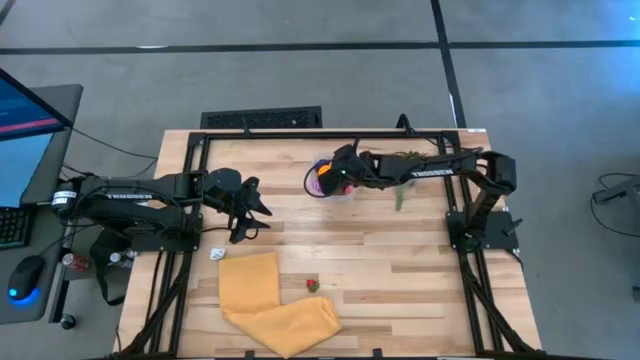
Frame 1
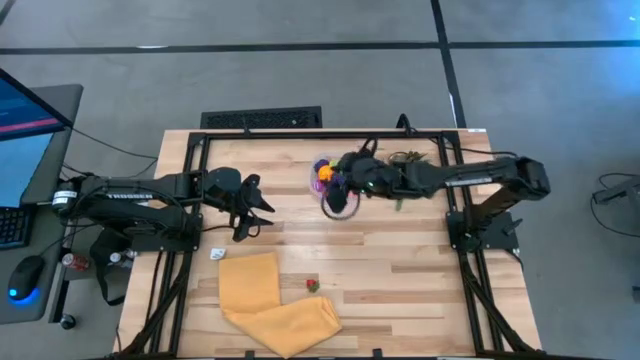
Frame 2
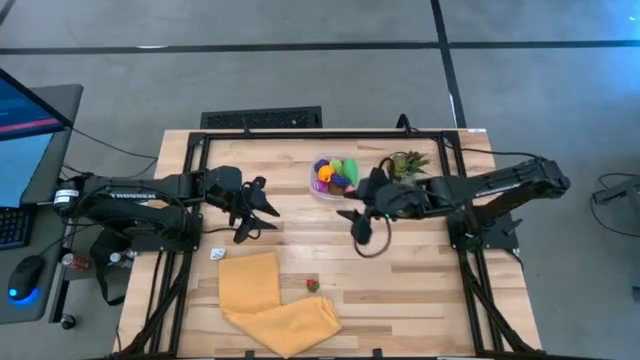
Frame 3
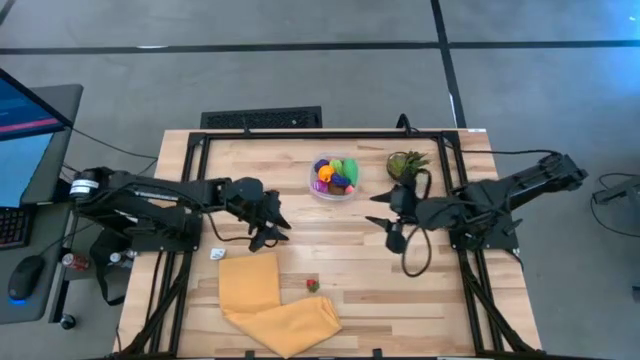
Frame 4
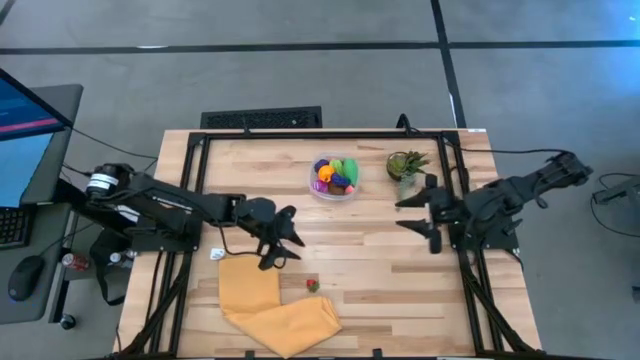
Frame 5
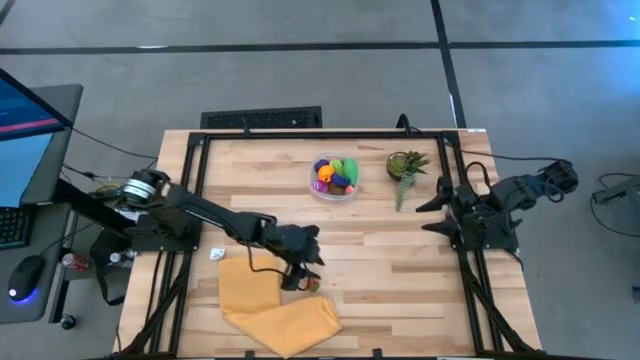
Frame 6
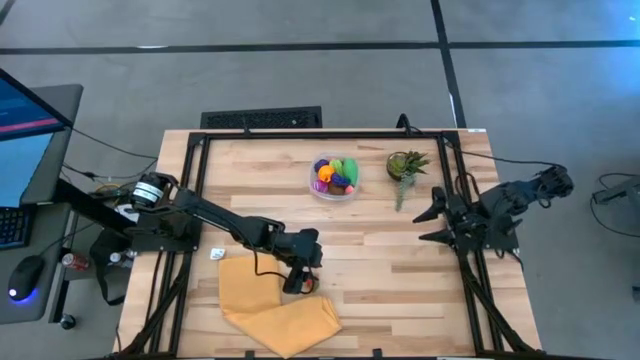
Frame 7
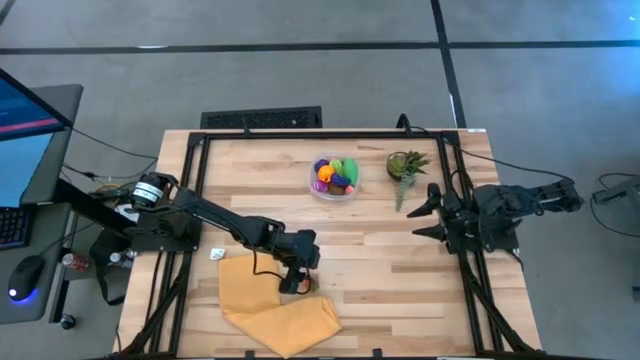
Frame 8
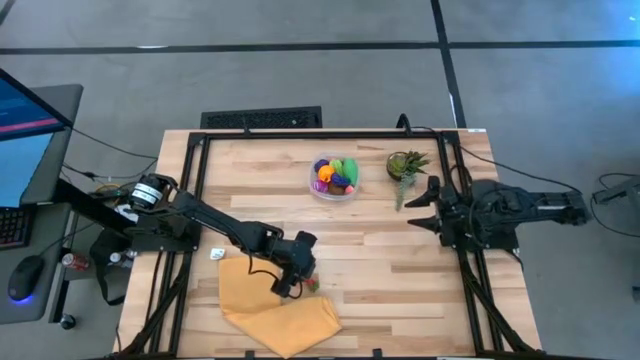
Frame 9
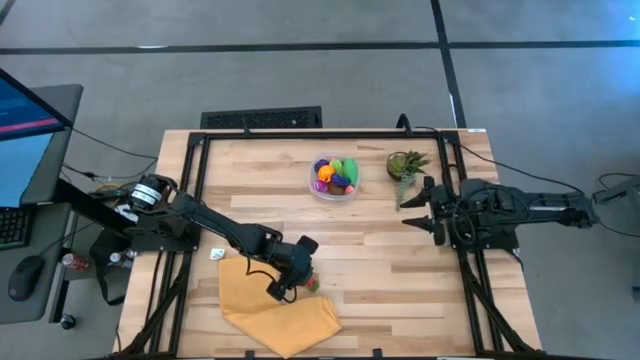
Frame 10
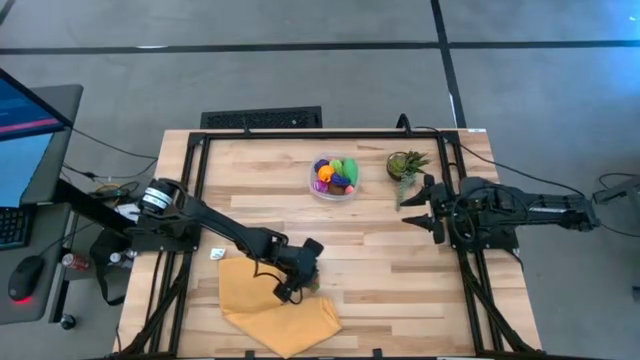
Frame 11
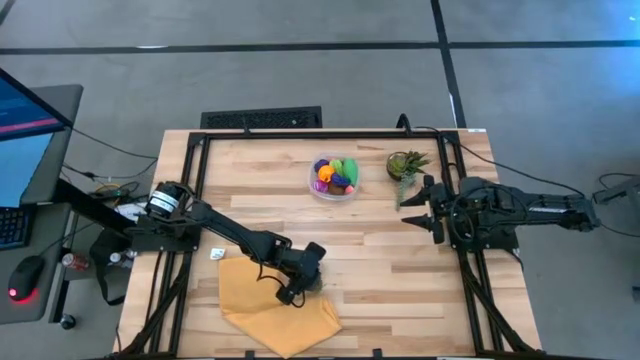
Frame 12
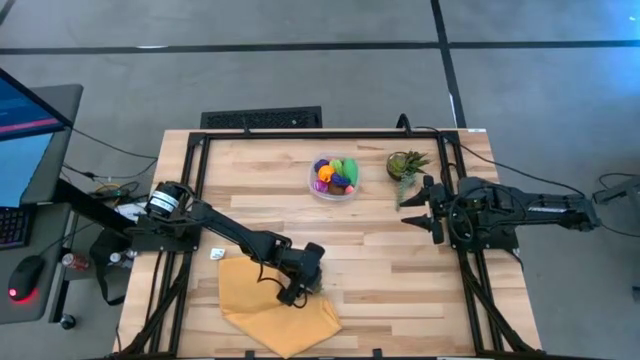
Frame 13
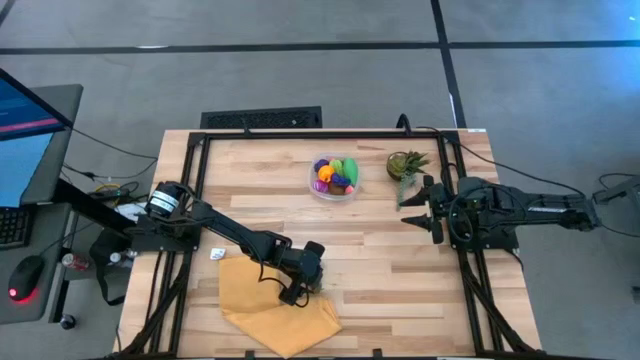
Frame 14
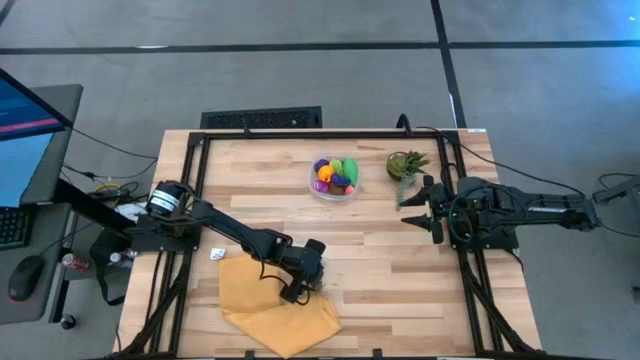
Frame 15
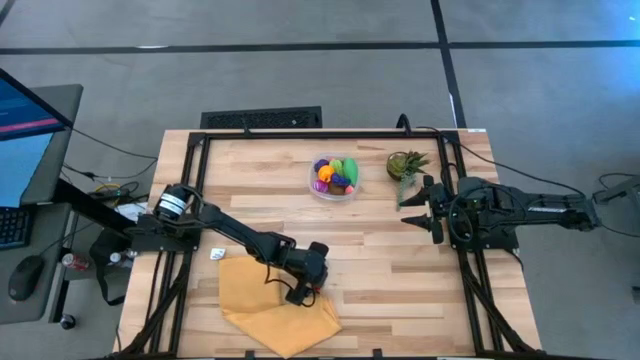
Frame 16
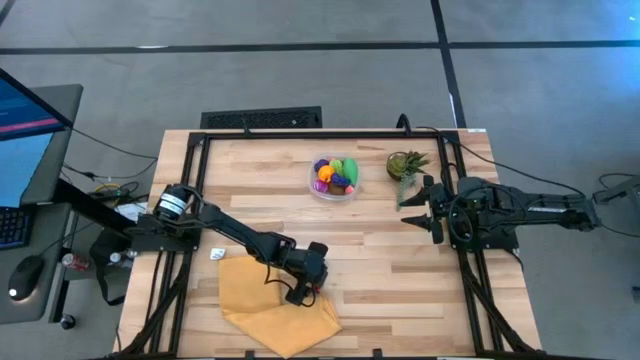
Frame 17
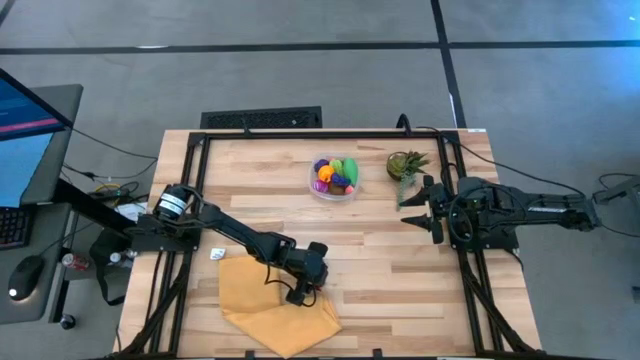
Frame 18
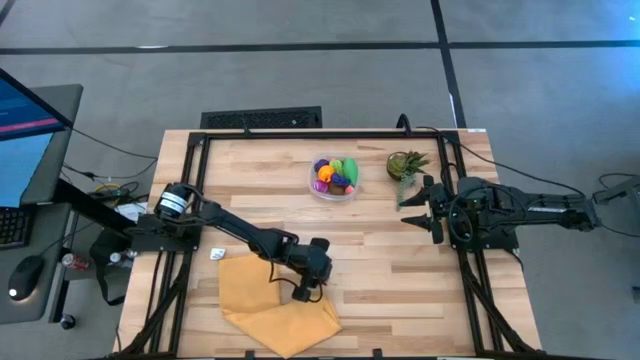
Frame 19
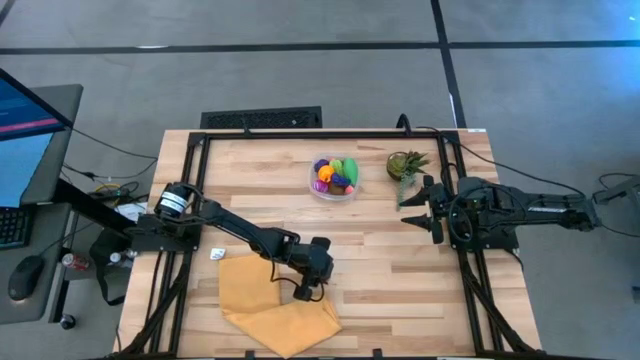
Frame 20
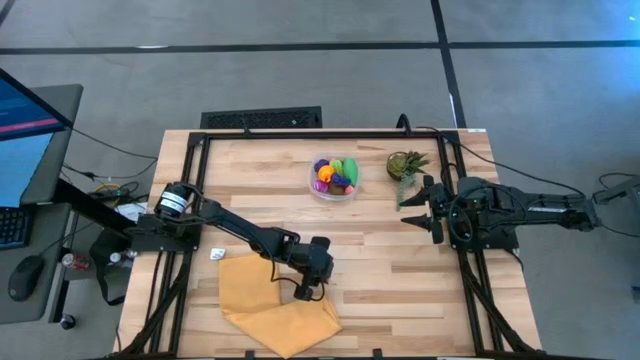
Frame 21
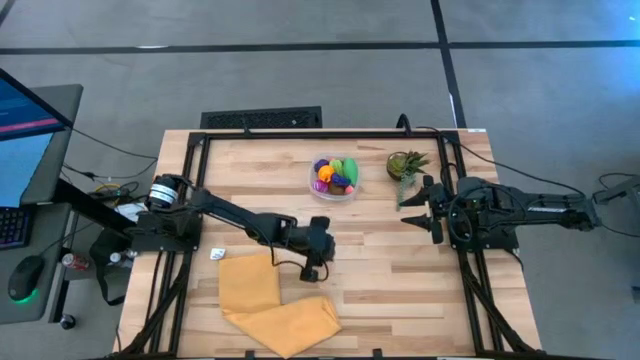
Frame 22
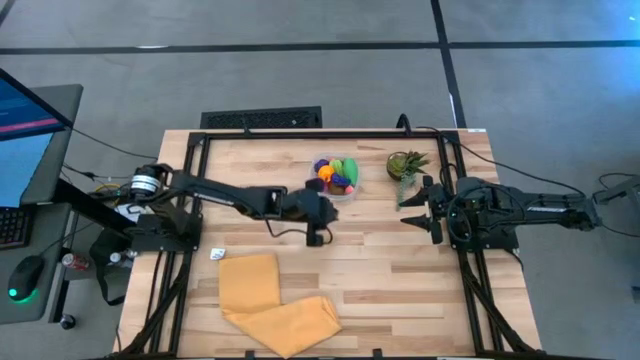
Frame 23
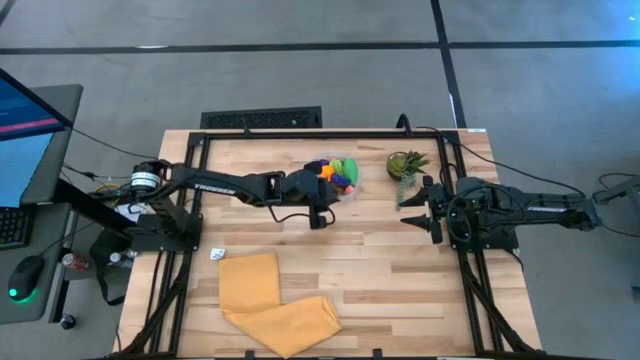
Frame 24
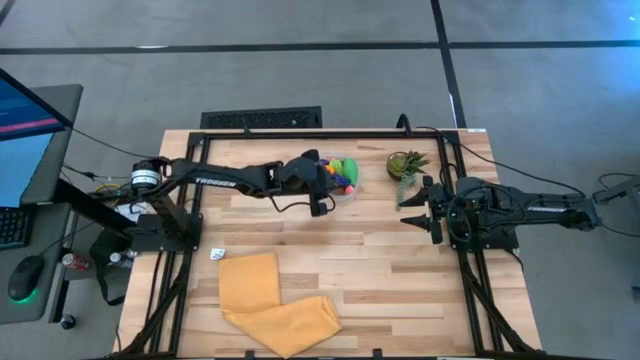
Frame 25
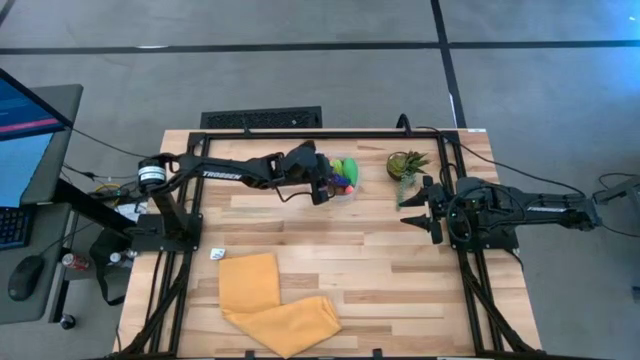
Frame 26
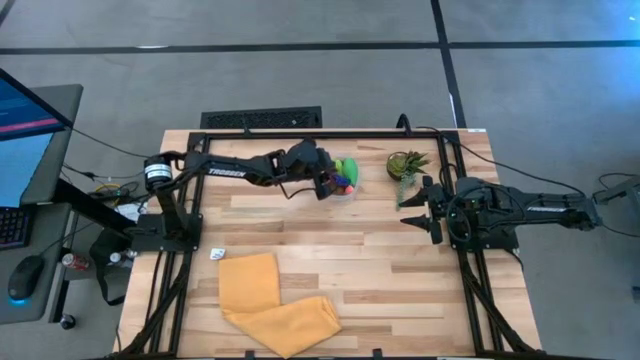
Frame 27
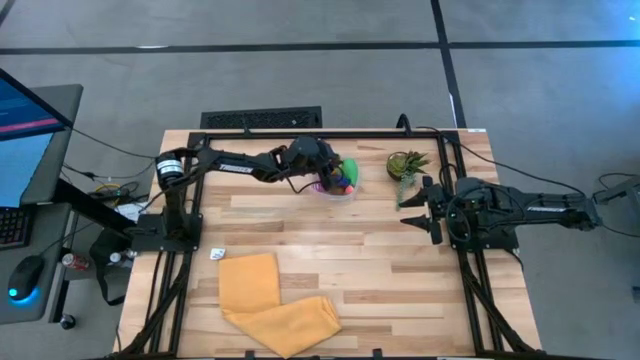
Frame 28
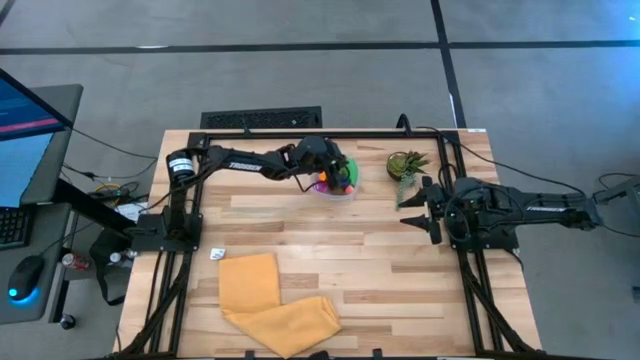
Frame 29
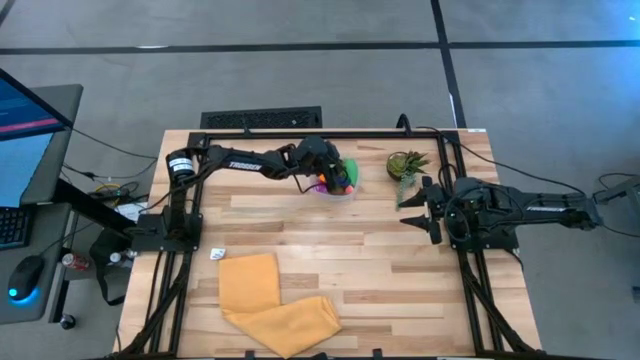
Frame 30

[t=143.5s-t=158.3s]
Task: Pick and placing Produce into tupperware
Put the strawberry in the transparent bin

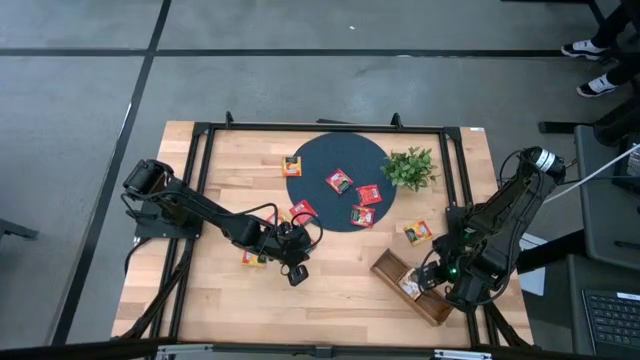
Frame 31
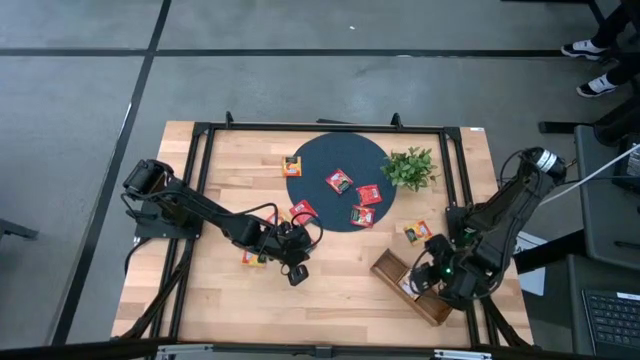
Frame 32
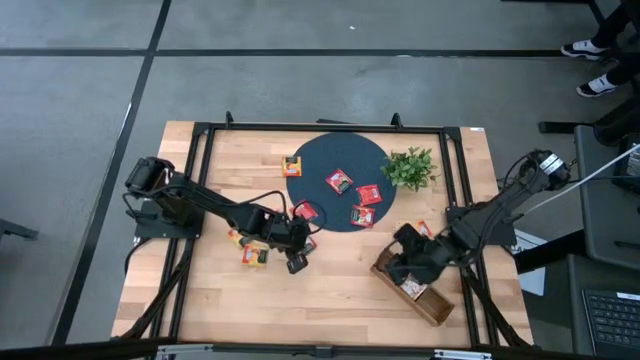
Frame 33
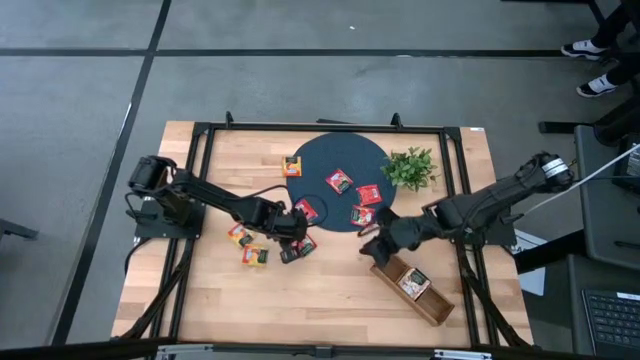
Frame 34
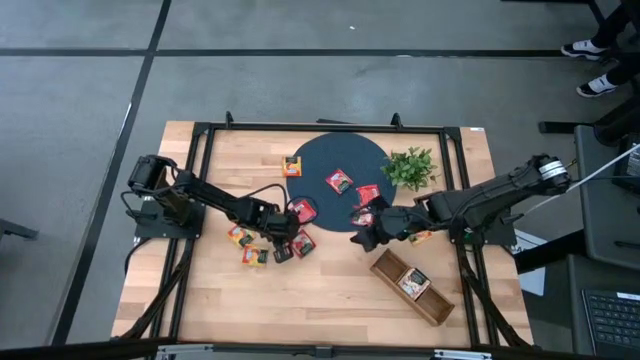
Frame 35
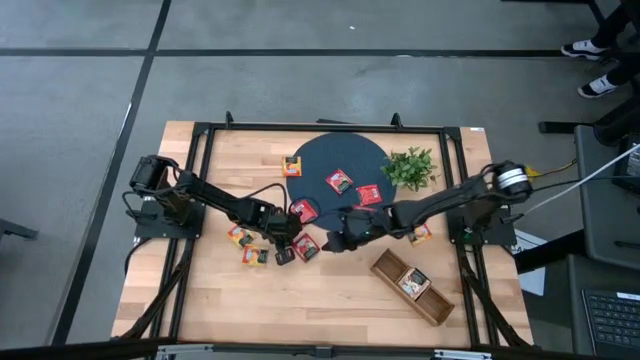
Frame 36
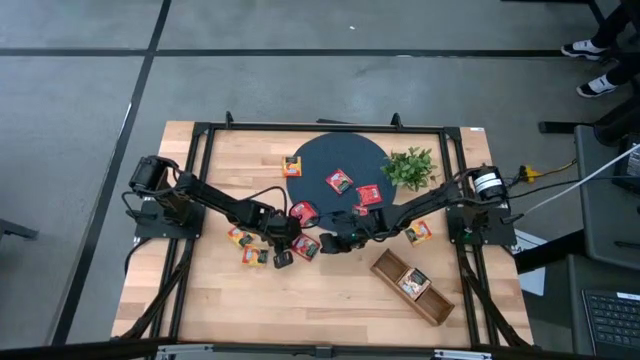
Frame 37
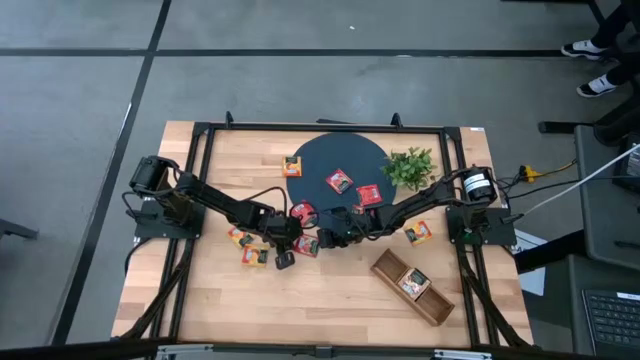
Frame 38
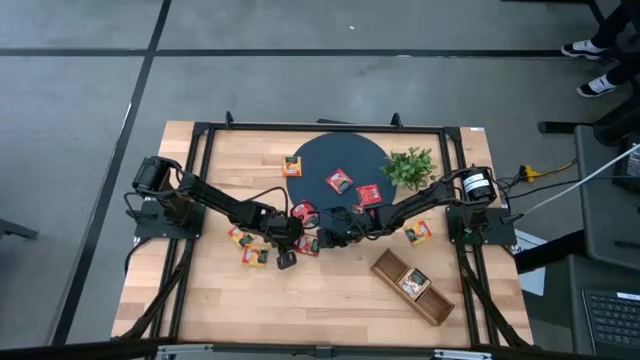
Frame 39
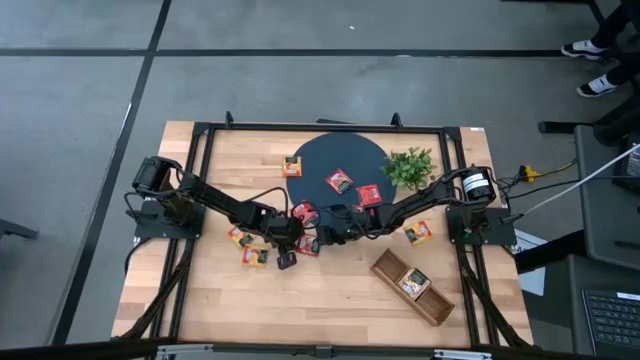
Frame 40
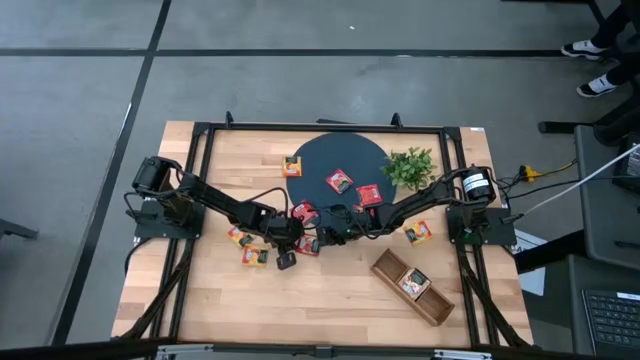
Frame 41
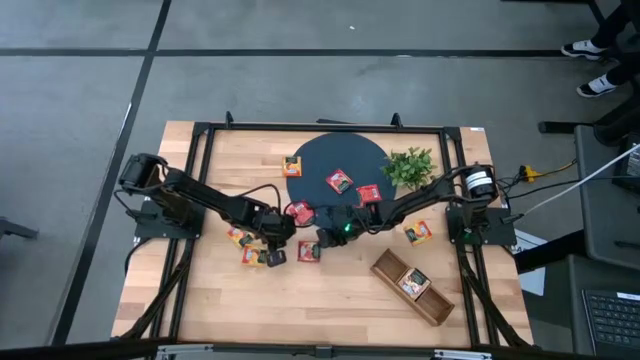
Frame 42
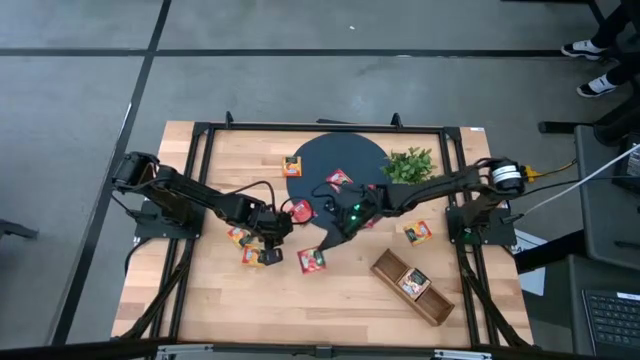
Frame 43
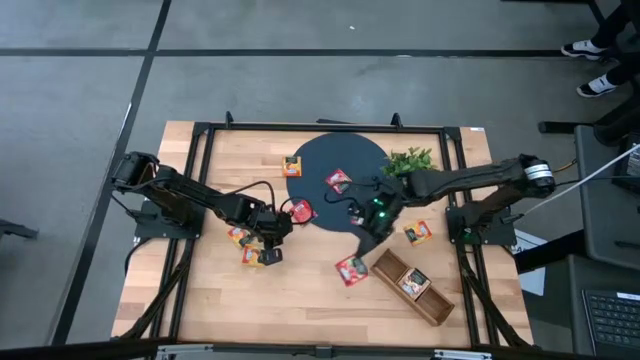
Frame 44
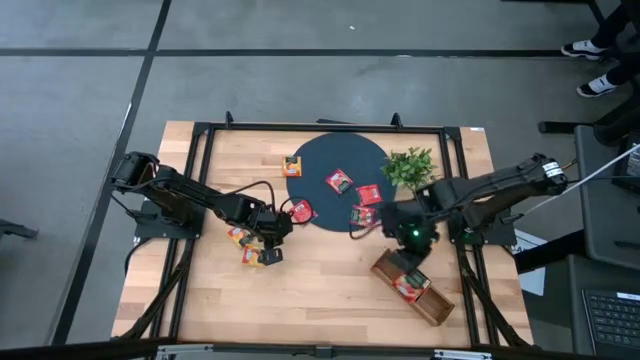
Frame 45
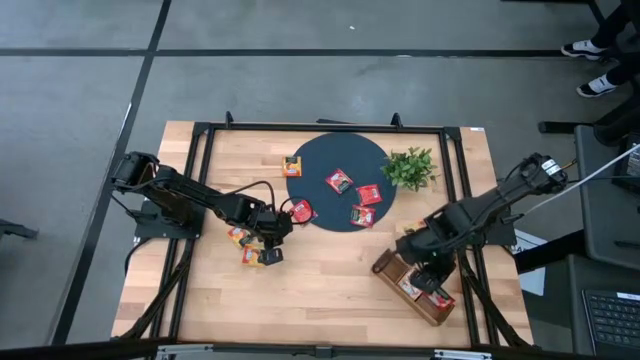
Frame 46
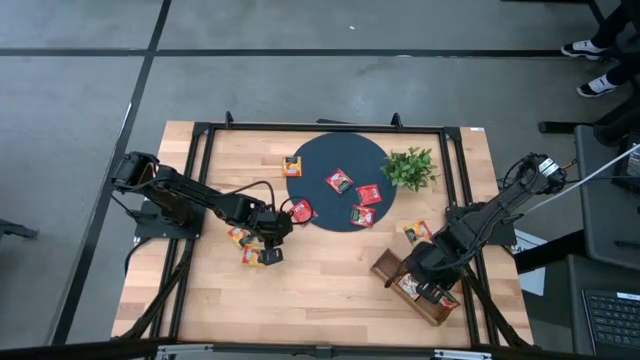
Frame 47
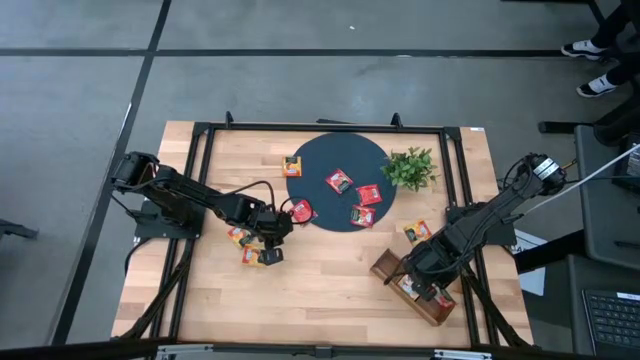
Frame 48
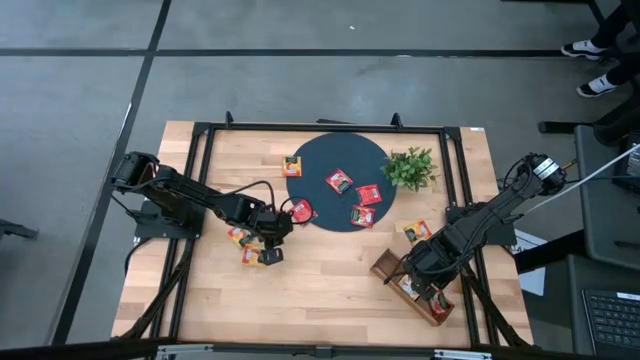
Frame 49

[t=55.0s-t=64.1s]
Task: Pick & Place Tea
Put the red tea bag into the right section of the wooden organizer
